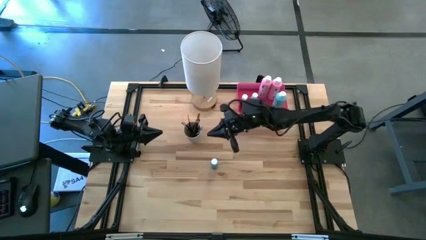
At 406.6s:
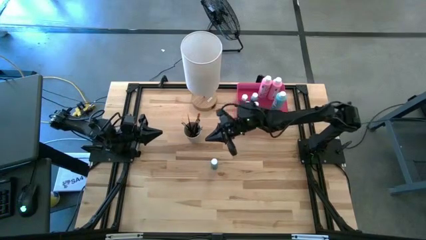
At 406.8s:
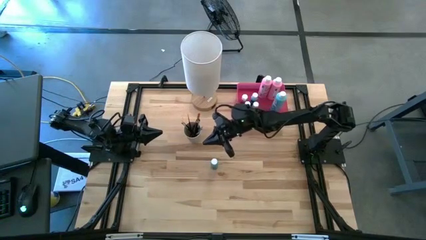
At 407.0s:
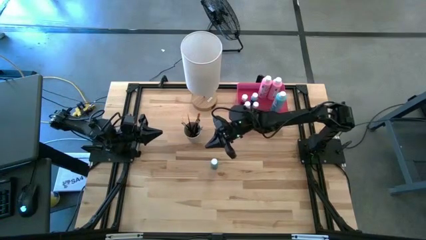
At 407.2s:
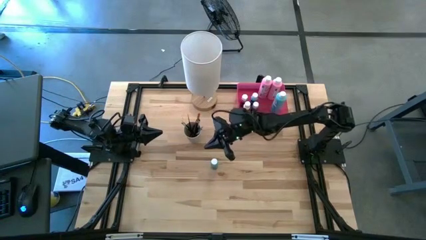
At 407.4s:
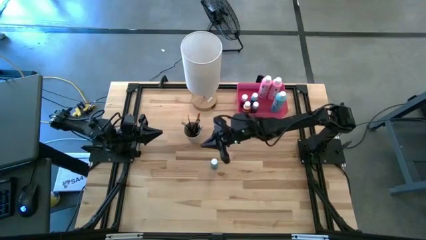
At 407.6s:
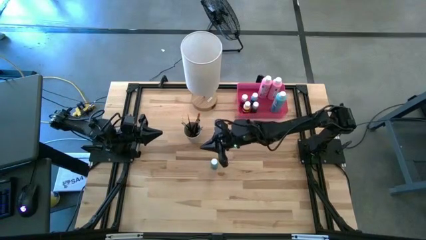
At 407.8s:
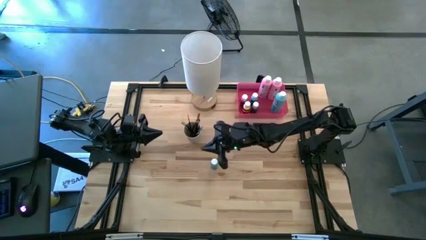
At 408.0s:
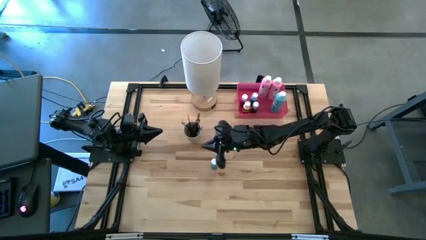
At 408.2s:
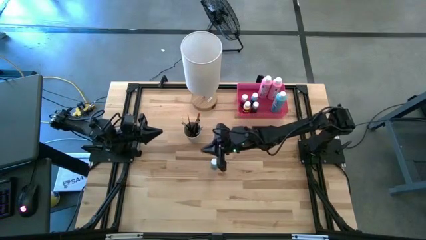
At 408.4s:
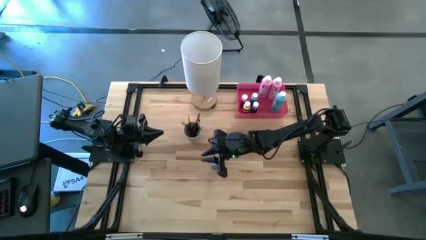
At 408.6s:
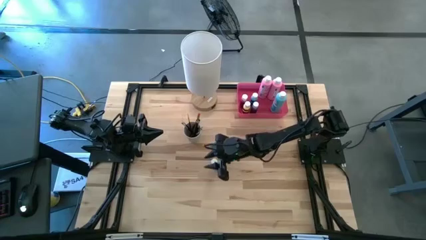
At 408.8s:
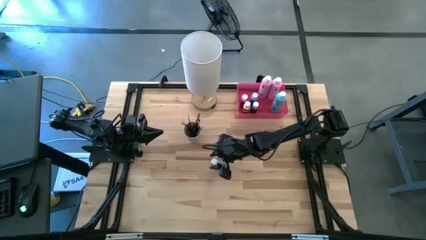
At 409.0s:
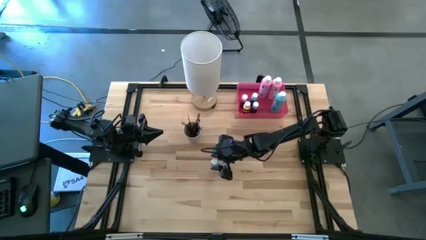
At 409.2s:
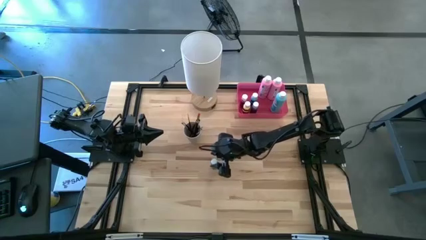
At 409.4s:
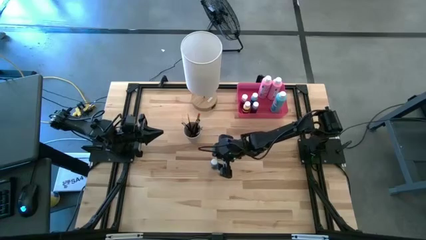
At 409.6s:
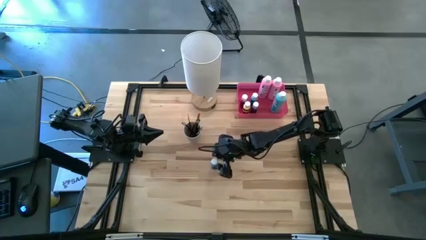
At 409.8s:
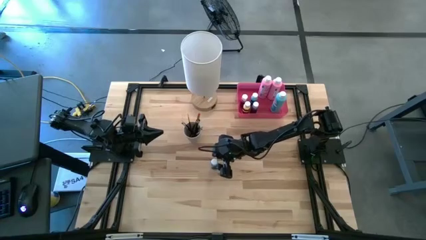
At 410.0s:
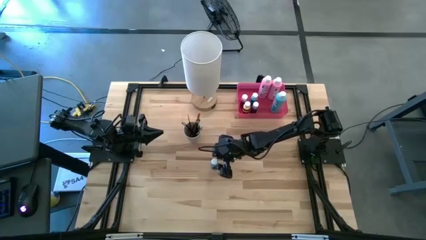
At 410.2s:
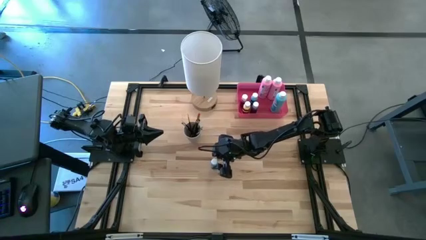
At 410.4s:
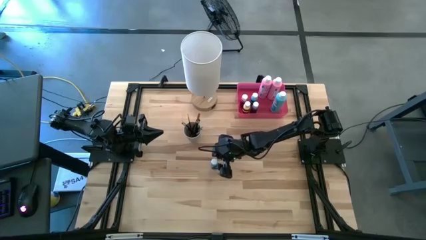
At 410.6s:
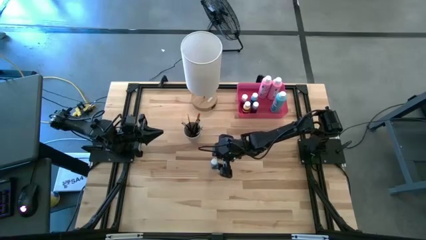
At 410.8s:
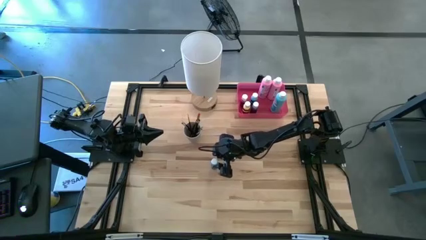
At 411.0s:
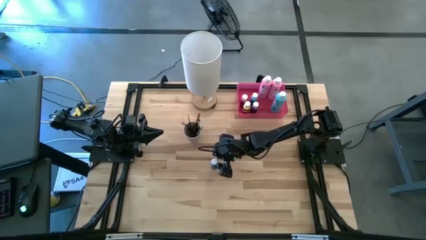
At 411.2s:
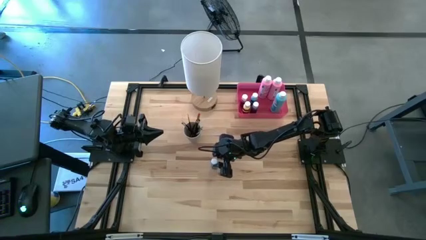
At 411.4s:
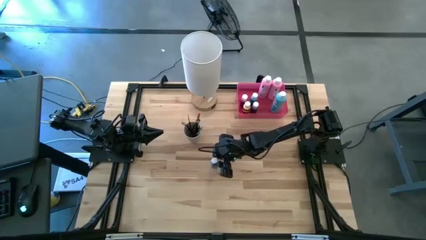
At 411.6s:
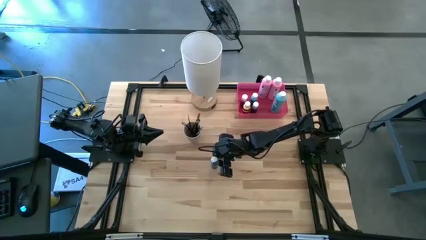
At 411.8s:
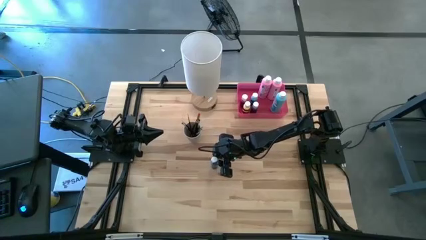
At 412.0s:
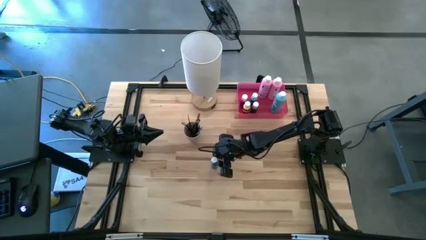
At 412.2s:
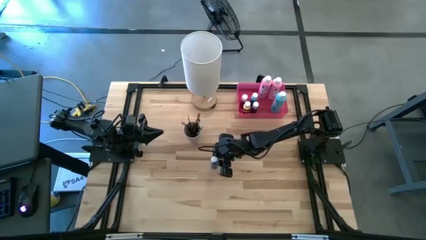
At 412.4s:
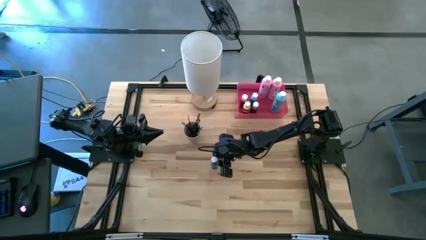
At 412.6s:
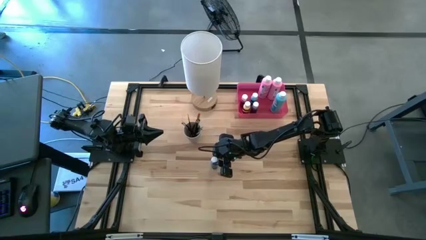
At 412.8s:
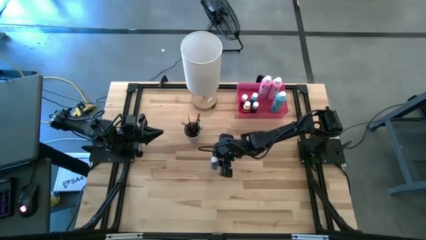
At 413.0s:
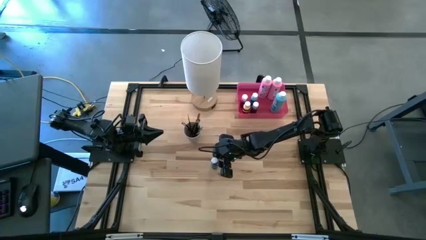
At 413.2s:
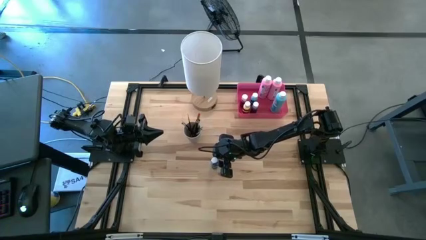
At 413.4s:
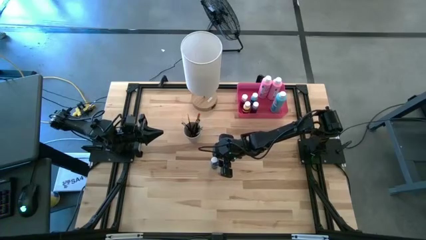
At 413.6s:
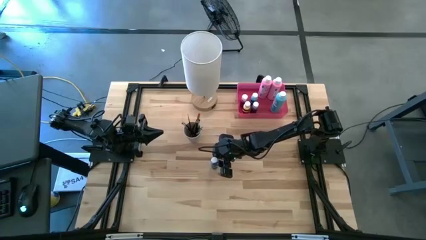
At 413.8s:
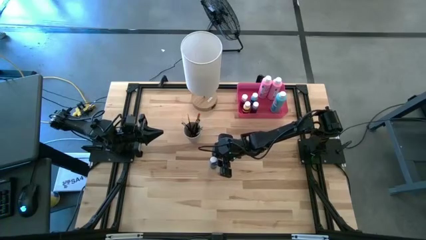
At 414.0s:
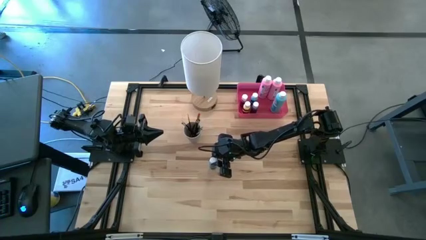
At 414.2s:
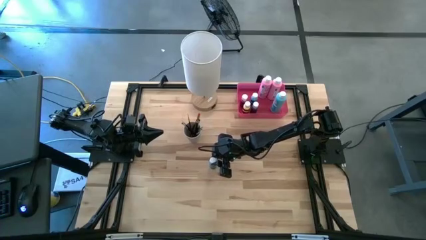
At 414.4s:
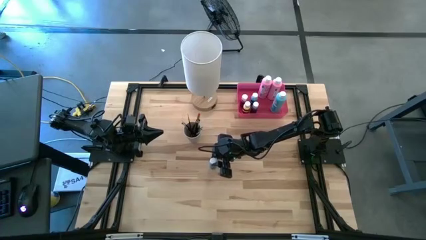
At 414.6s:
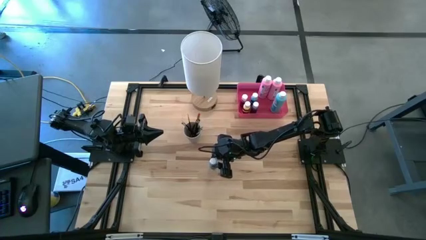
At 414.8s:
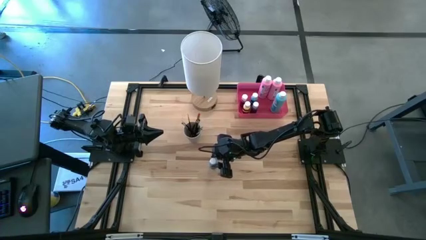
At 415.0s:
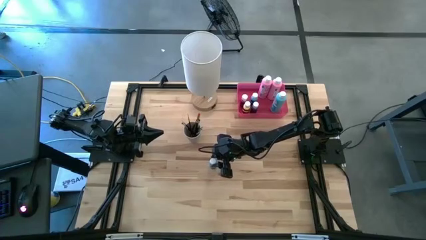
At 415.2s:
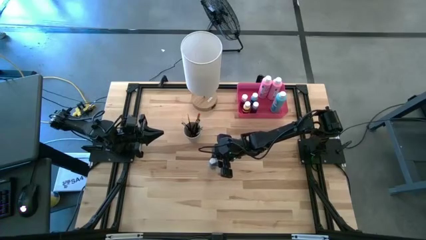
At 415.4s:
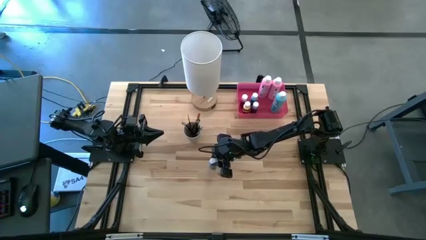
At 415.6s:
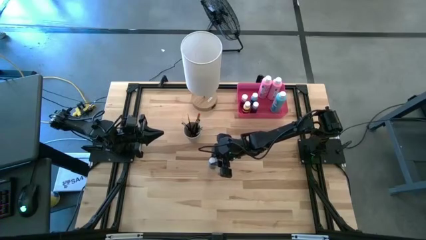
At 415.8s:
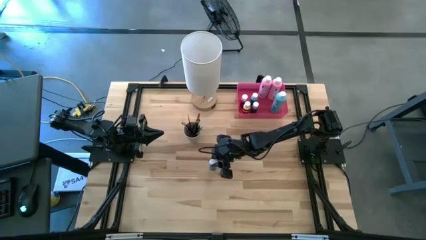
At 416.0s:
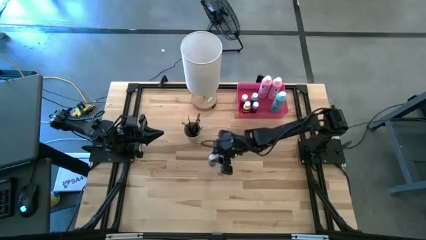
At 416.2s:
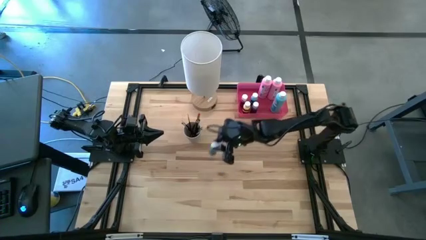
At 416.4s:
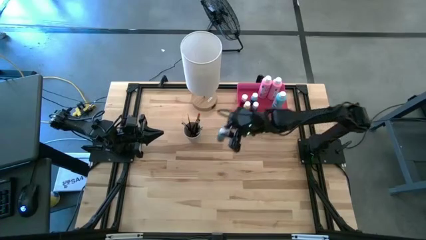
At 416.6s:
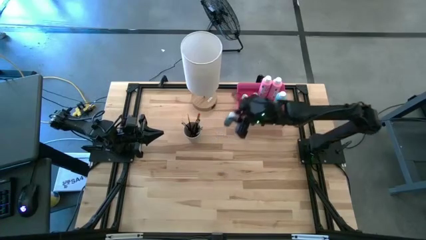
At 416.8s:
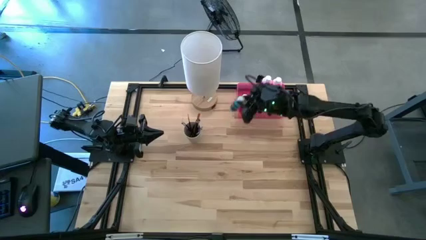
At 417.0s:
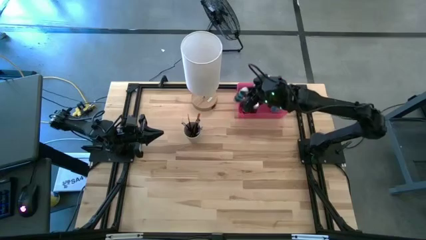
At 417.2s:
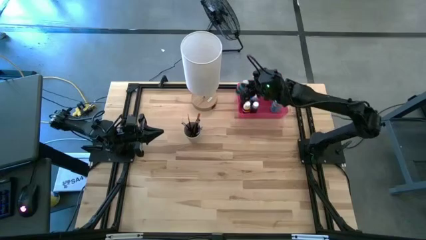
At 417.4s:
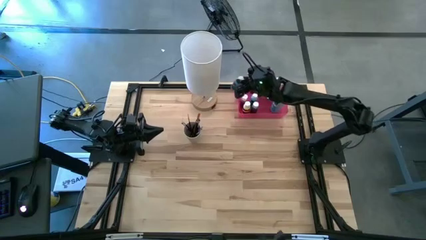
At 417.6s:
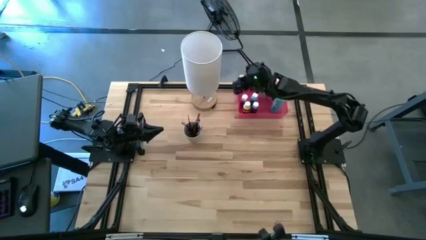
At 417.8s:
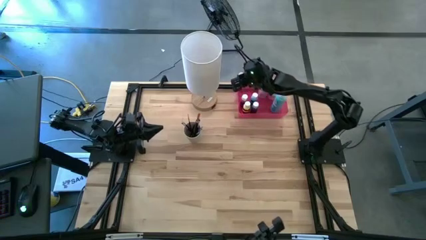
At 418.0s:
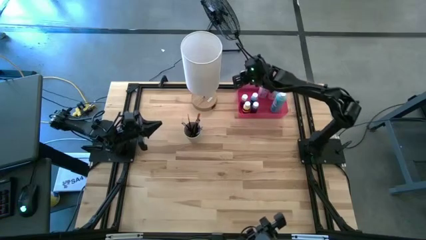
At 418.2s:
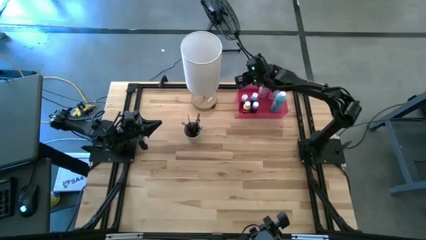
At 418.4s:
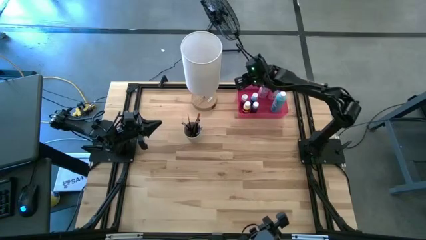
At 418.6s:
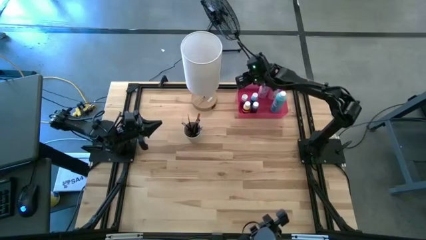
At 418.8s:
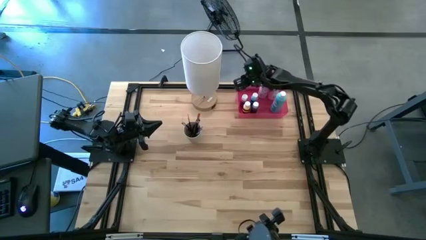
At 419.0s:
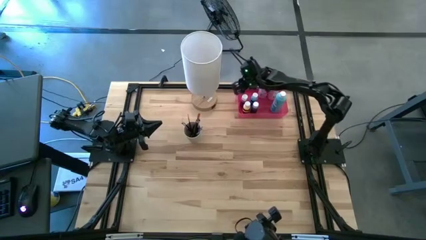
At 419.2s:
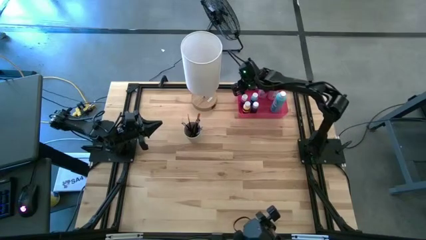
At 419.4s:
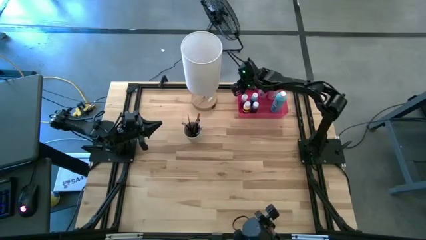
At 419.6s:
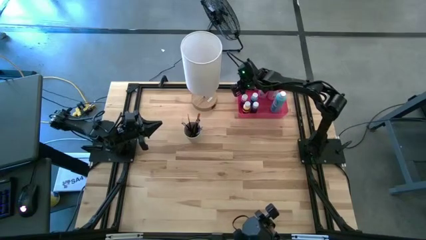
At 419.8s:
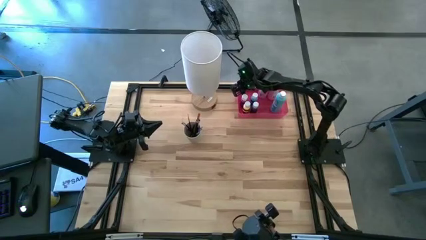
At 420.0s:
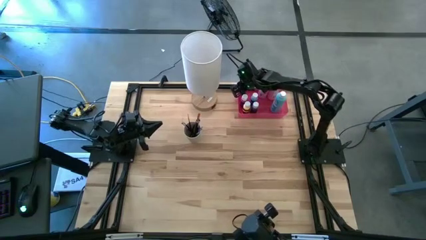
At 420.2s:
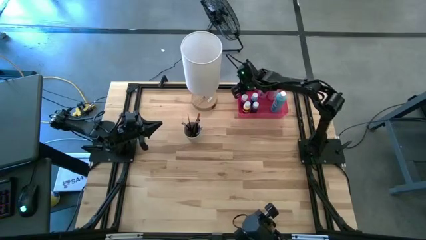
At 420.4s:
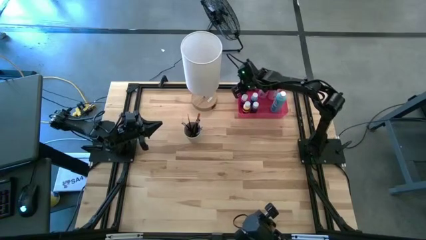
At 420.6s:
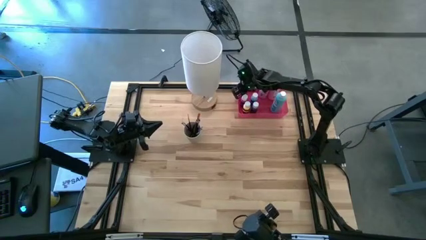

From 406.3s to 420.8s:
Task: Pick & Place Paint Supplies
Put the small blue paint bottle into the pink bin
